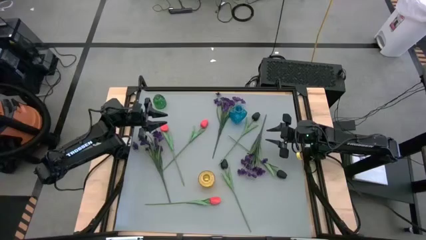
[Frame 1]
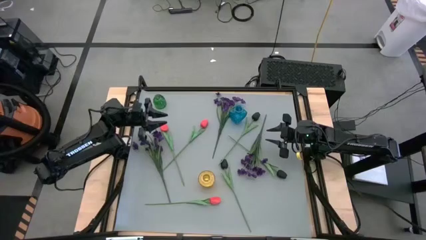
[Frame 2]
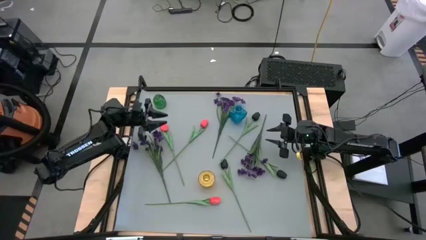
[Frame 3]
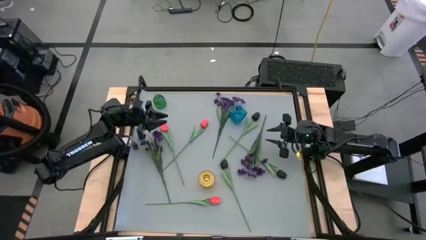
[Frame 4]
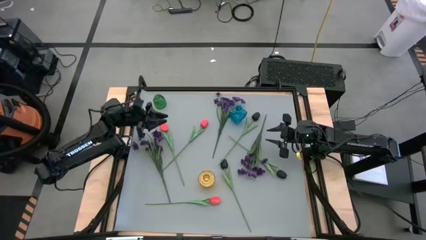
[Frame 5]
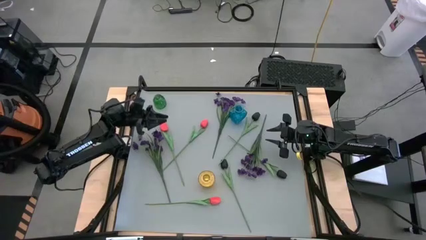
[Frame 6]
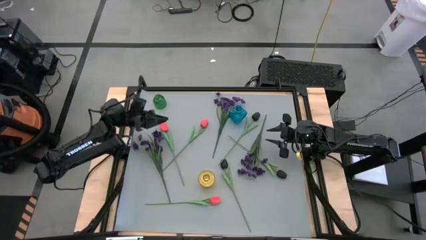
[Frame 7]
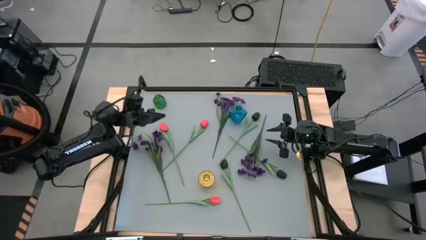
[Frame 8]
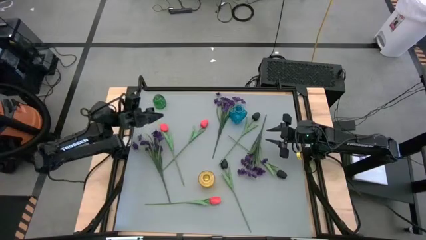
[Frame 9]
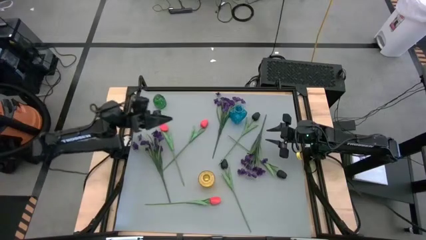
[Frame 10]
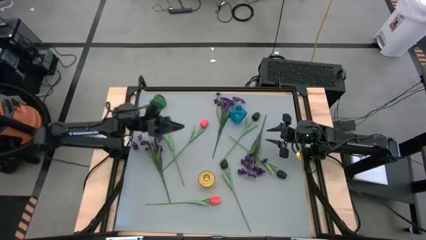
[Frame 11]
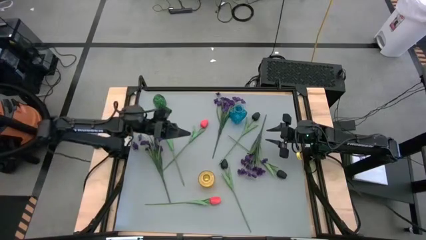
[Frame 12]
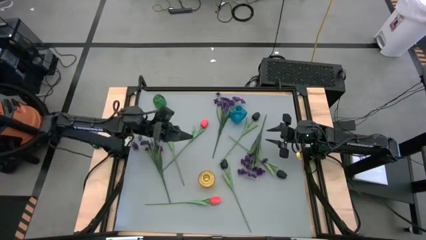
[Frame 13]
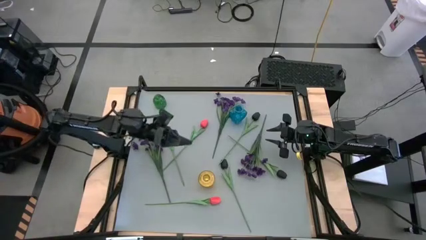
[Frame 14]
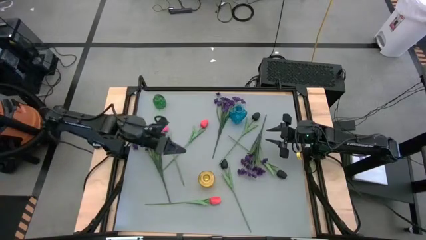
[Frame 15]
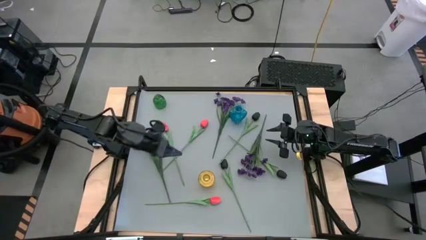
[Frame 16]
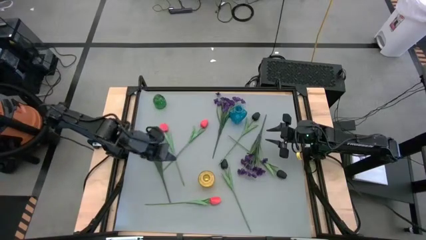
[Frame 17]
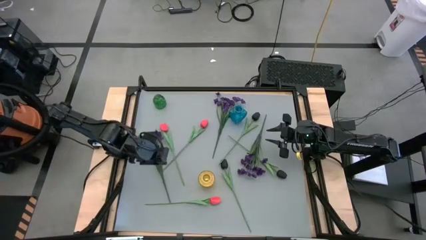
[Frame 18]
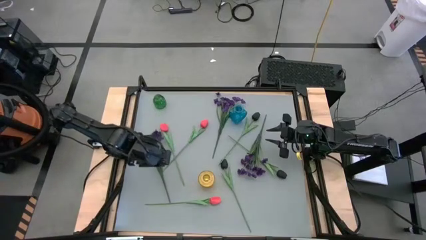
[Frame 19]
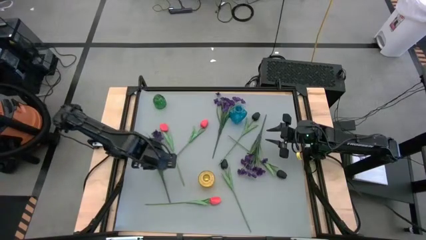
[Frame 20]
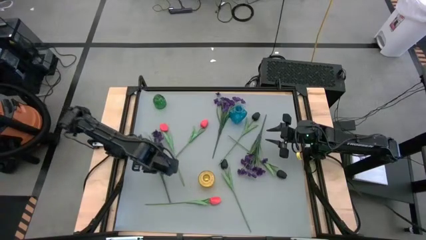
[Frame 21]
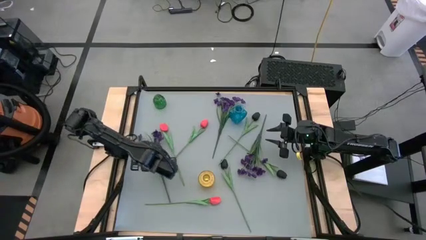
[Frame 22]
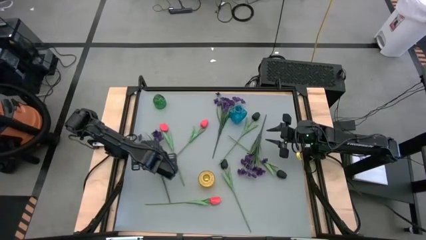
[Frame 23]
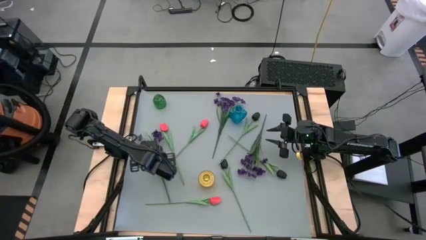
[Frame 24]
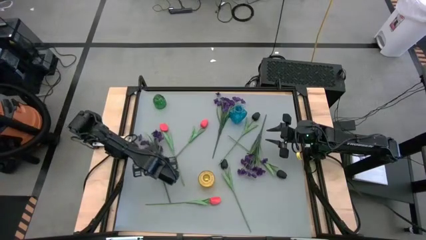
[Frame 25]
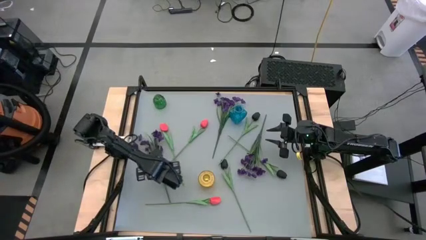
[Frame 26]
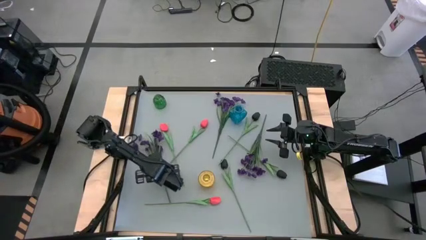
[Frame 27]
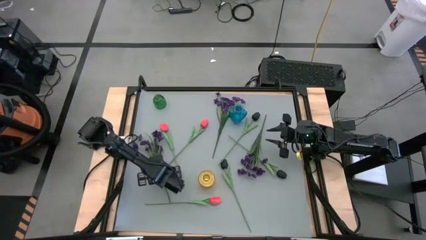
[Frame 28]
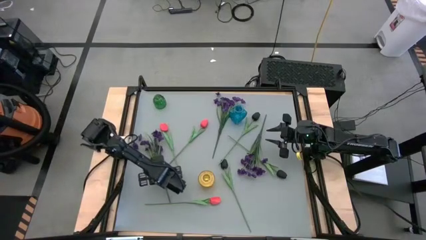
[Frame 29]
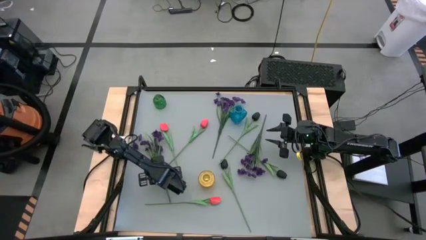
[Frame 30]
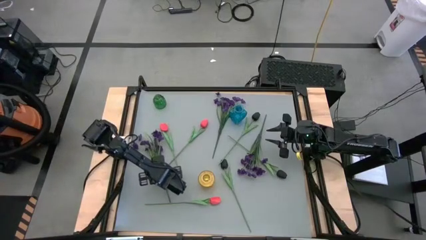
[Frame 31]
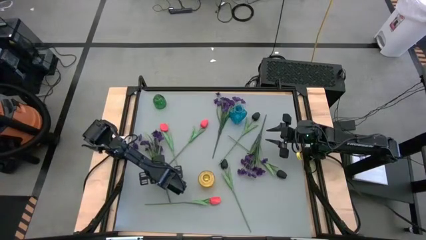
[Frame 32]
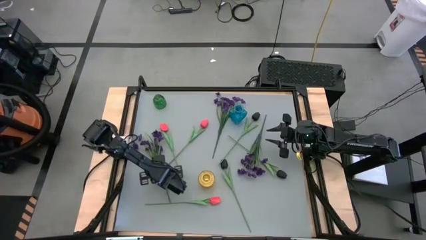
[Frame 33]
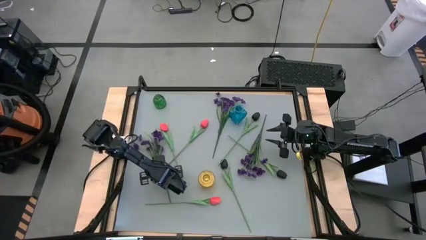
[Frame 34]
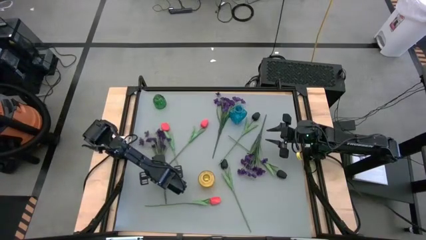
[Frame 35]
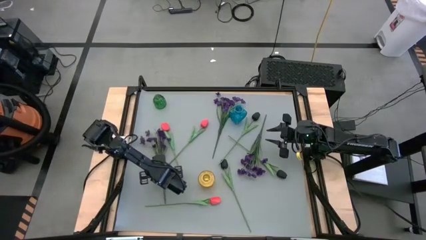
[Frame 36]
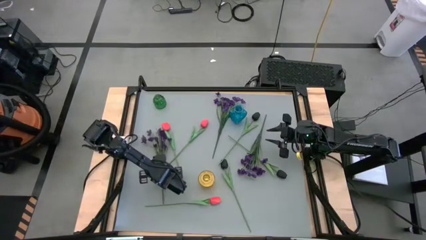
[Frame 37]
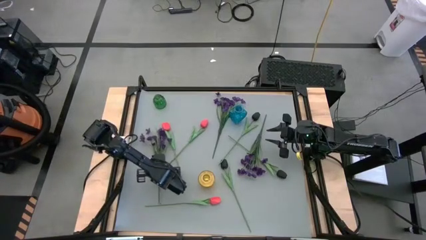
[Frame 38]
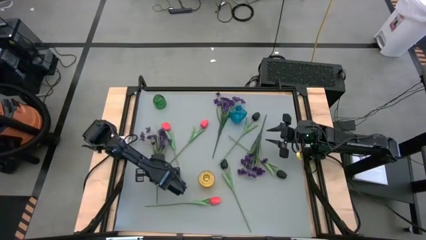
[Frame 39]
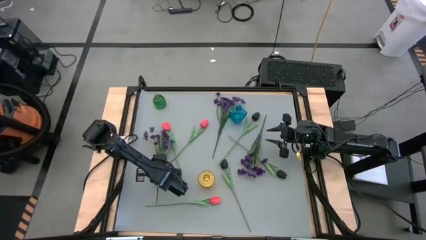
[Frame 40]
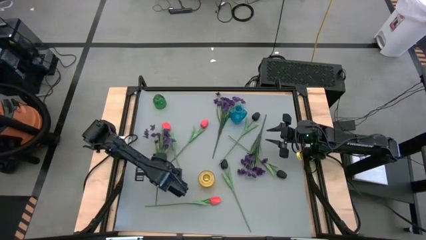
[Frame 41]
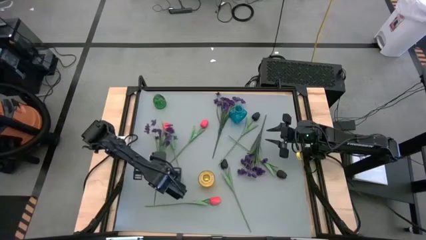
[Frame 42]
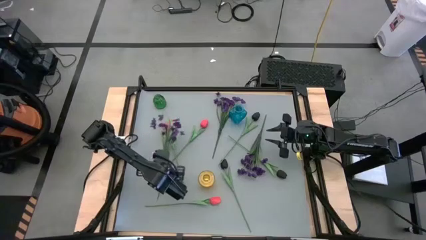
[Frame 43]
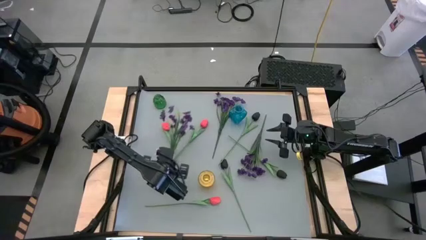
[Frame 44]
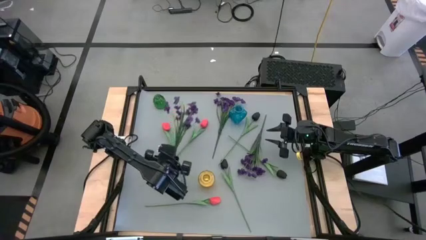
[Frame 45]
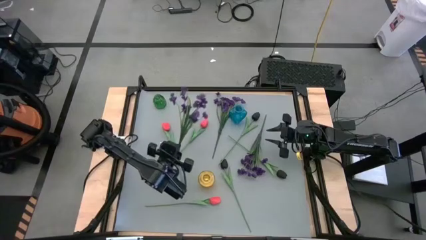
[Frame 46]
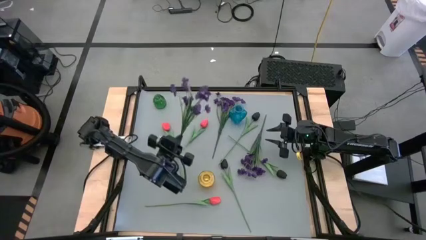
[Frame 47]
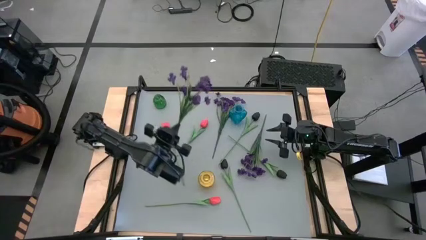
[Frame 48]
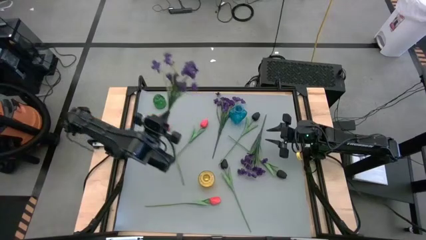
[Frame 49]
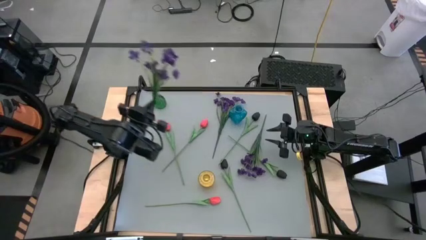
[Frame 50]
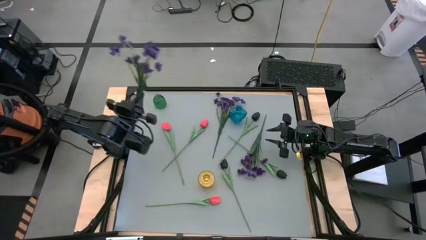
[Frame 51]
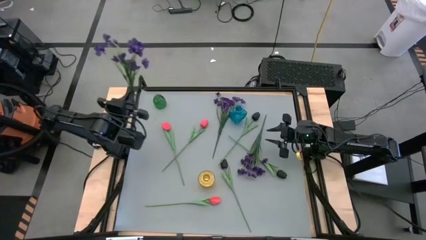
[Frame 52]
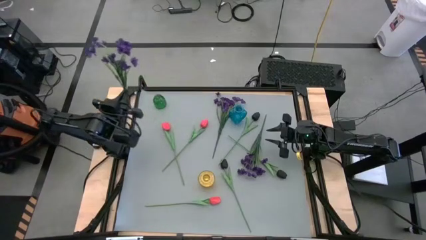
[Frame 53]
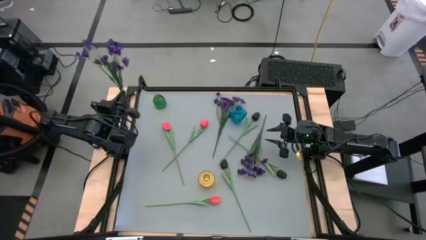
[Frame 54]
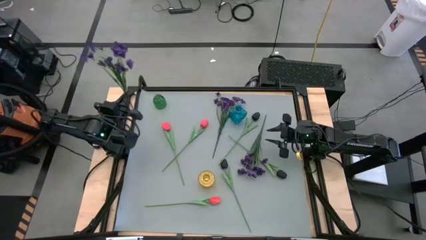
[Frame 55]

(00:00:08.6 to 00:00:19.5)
Task: Sort flowers into vase by color
Put the left purple flowers into the blue vase

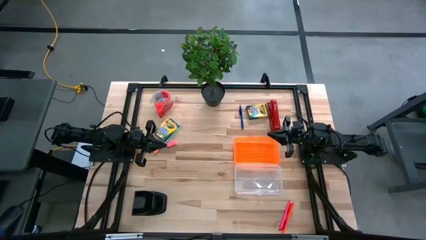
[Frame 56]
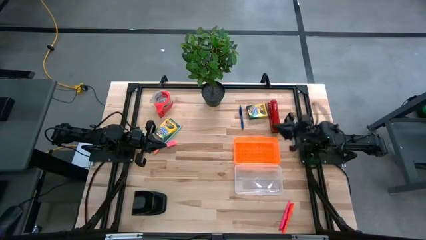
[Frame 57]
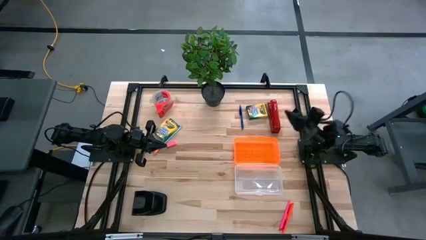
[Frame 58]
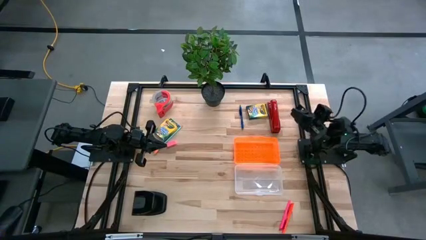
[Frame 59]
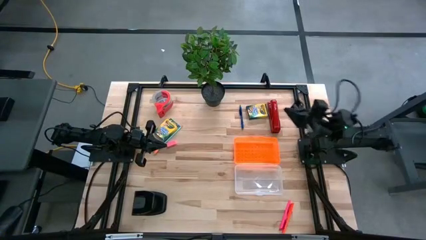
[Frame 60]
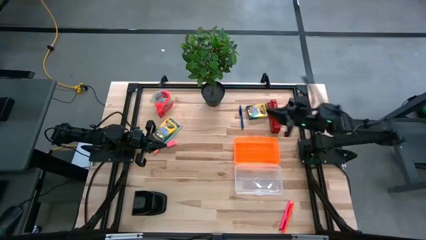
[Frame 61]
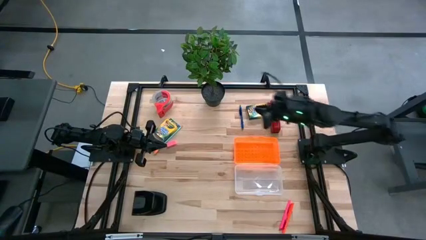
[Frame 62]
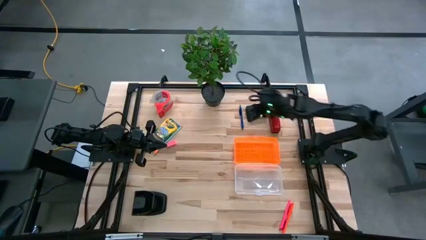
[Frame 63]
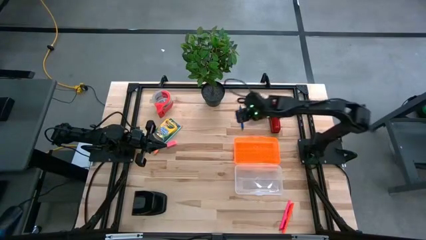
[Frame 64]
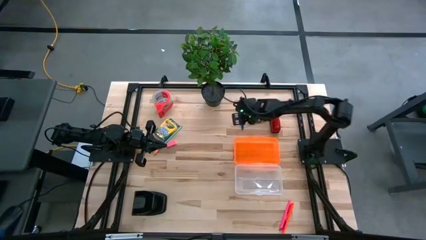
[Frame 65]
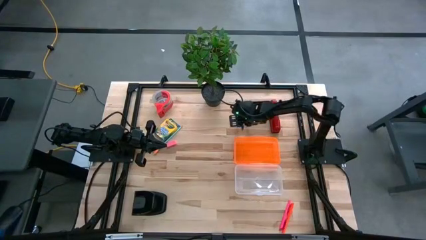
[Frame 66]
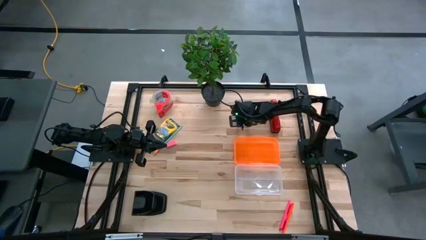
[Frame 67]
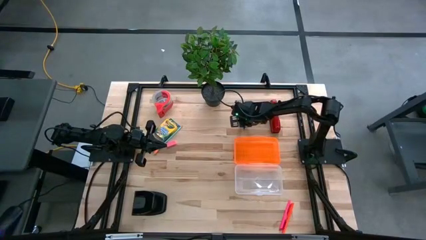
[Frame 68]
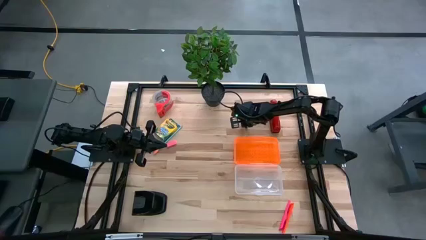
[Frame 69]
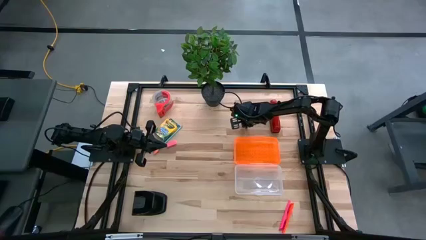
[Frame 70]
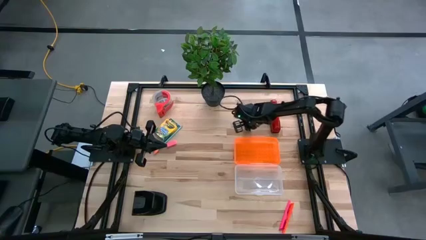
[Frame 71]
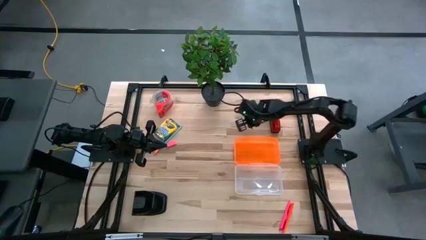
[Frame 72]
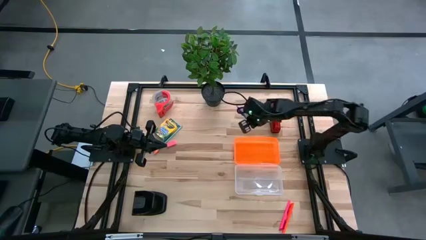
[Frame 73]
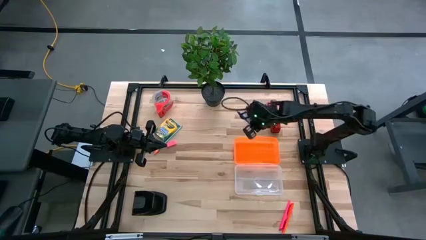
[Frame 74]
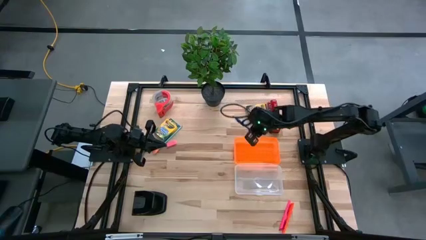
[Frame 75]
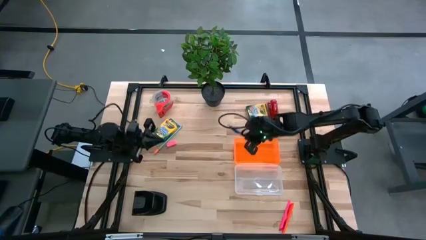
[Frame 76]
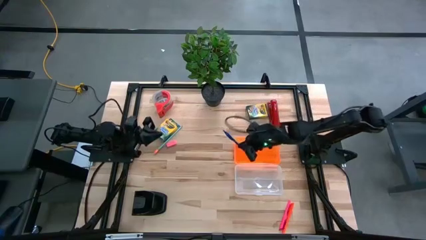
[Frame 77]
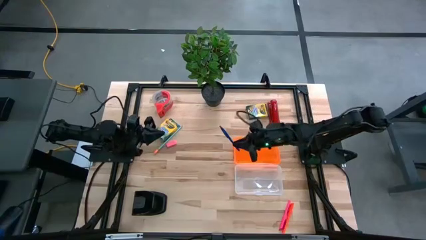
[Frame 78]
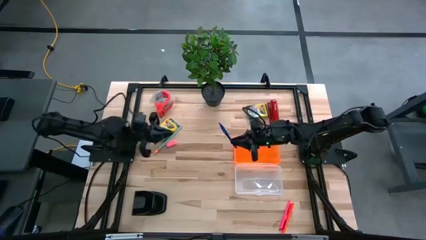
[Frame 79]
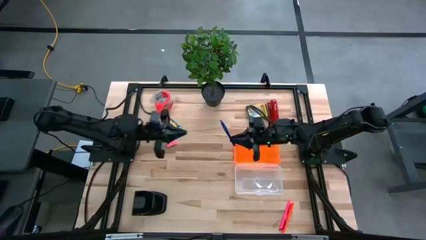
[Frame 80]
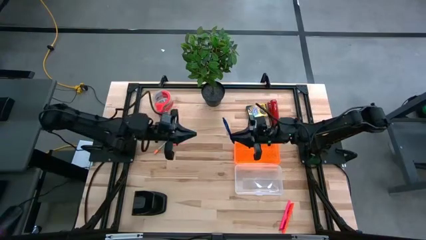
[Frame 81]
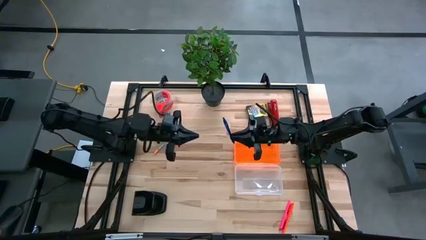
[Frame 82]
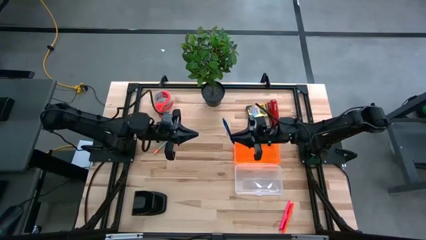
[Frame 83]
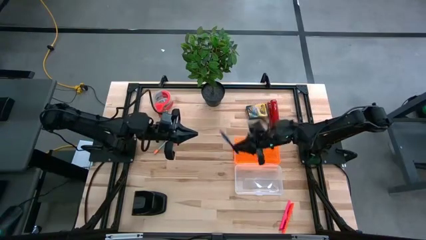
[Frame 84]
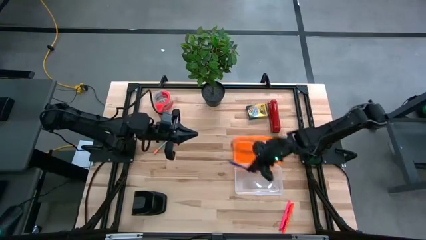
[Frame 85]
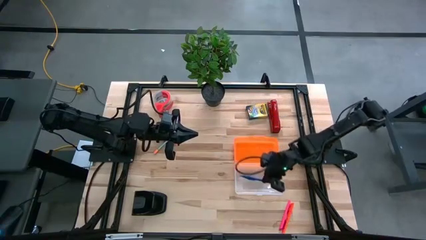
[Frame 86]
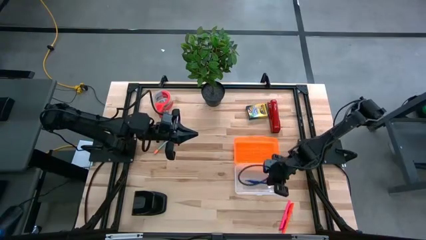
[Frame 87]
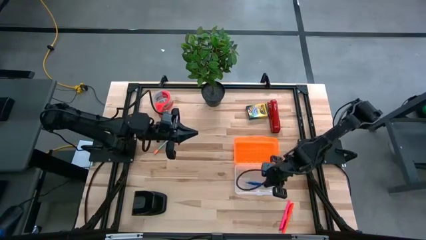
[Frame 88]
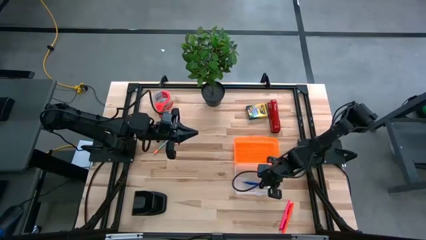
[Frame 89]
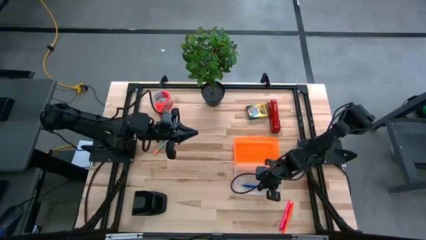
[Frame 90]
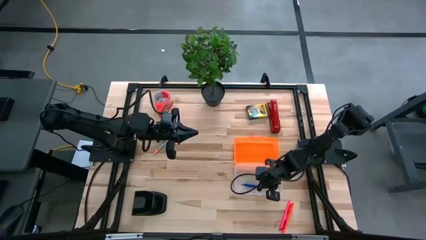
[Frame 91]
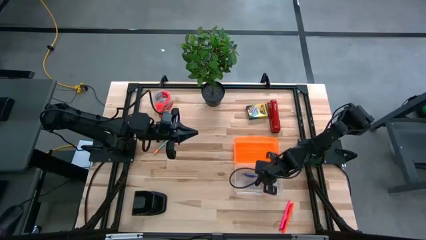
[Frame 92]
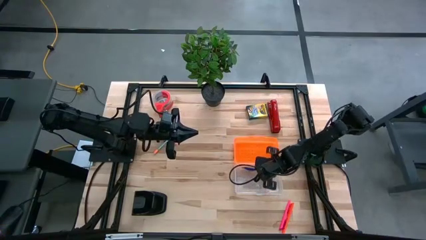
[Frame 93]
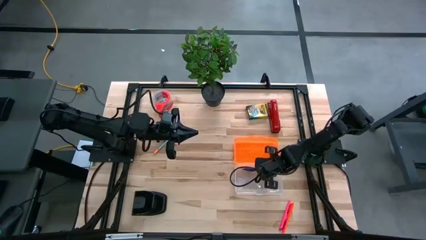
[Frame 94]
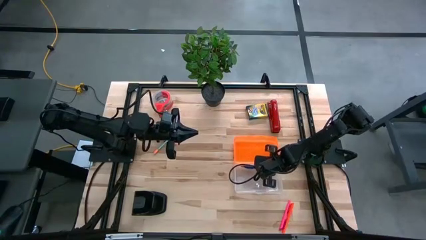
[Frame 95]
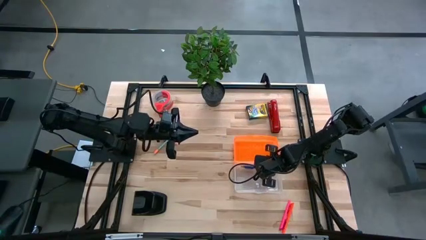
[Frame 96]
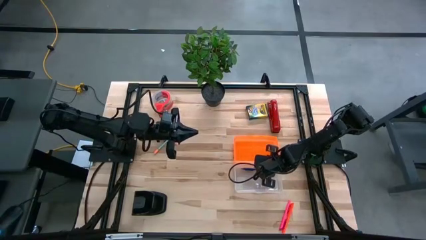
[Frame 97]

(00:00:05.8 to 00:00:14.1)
Task: Pack school essentials
Put the blue pen into the orange supply box
